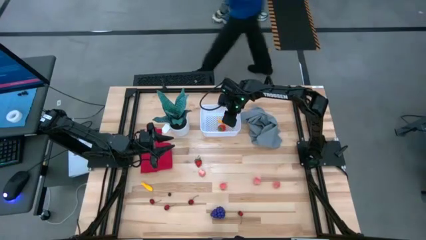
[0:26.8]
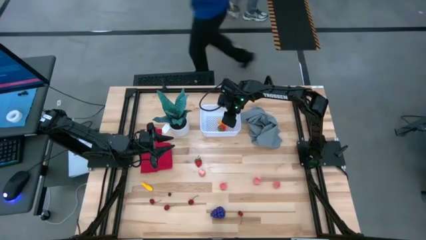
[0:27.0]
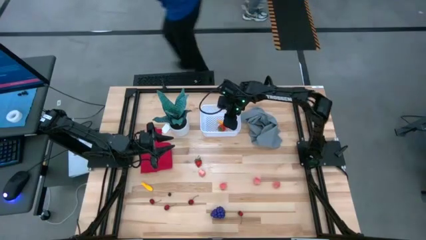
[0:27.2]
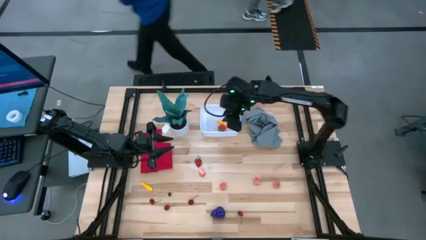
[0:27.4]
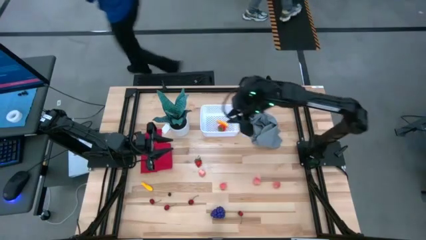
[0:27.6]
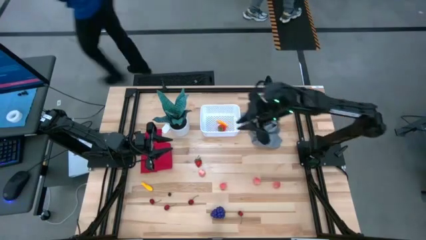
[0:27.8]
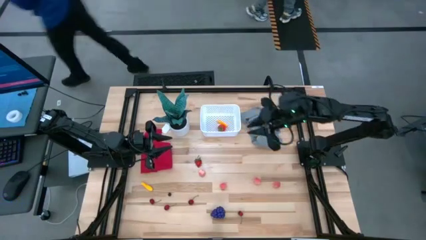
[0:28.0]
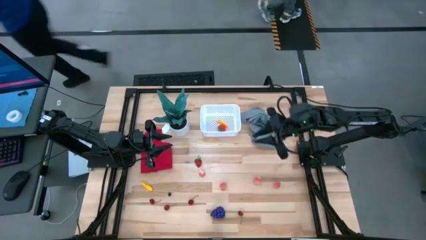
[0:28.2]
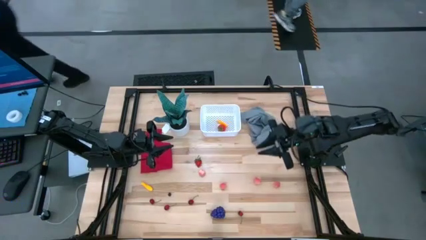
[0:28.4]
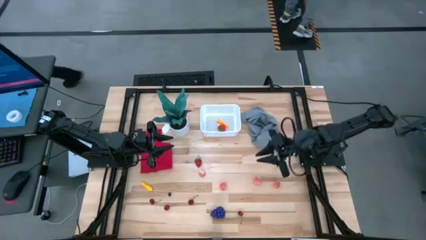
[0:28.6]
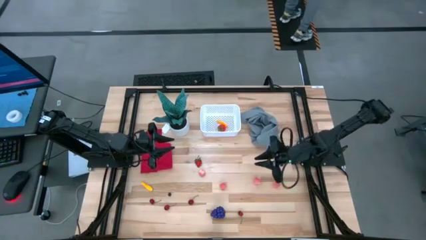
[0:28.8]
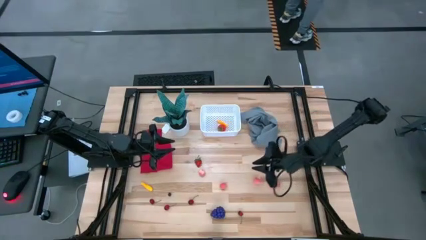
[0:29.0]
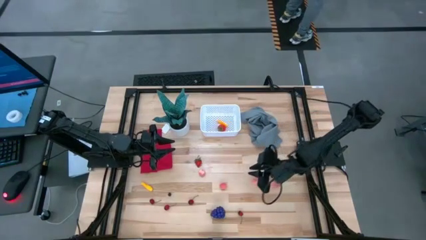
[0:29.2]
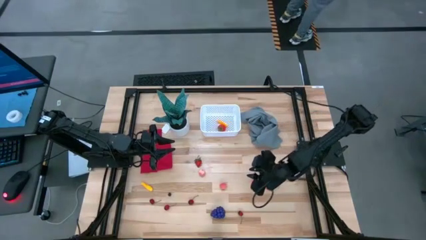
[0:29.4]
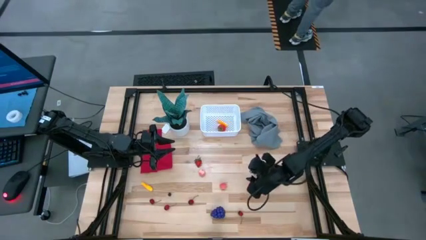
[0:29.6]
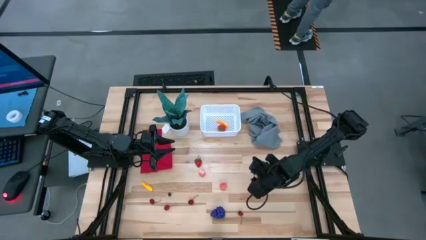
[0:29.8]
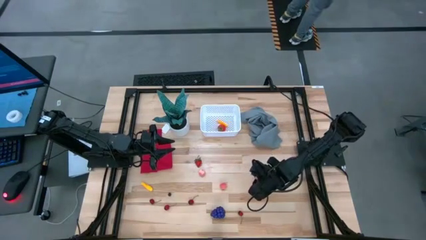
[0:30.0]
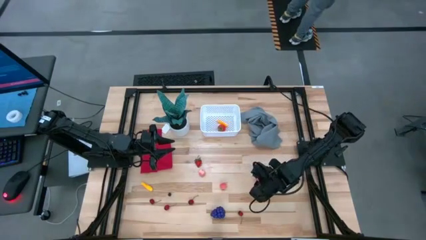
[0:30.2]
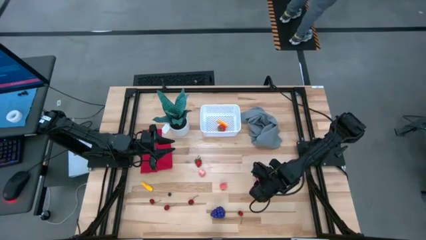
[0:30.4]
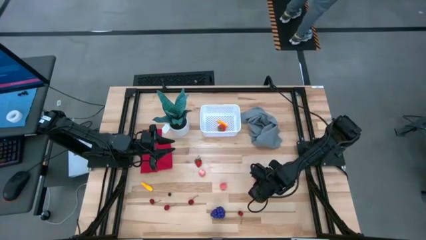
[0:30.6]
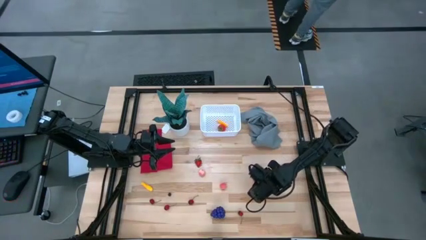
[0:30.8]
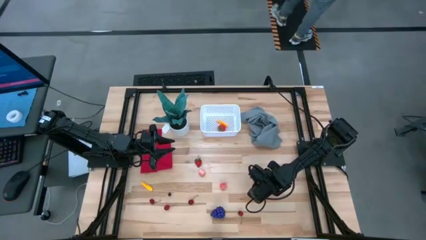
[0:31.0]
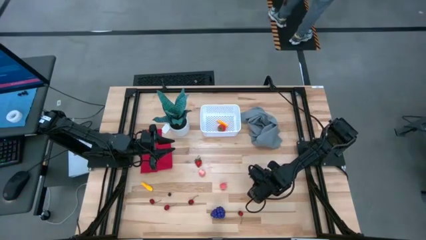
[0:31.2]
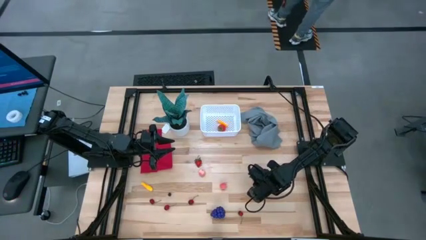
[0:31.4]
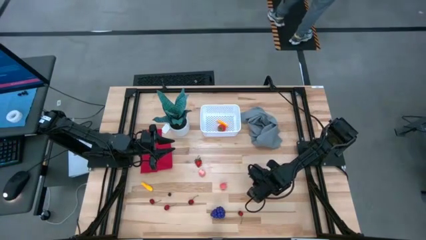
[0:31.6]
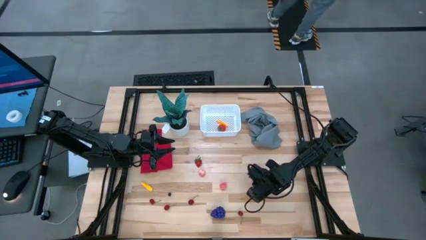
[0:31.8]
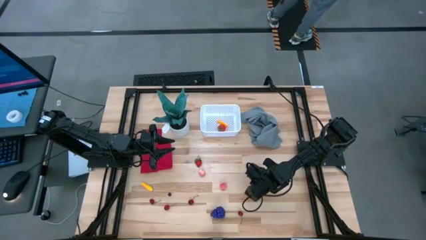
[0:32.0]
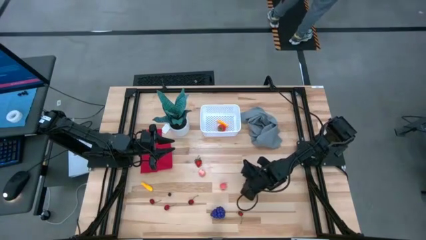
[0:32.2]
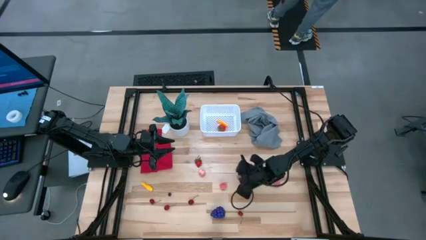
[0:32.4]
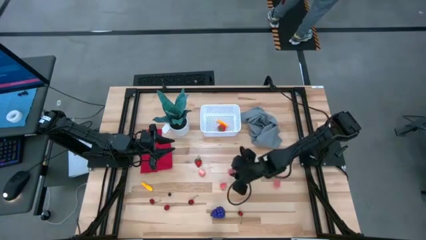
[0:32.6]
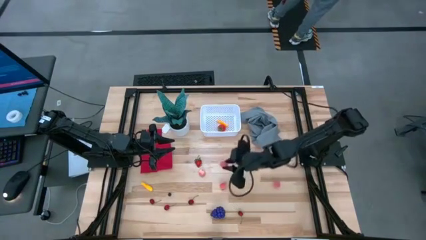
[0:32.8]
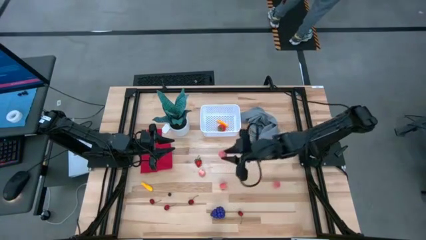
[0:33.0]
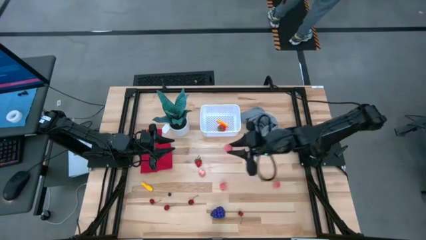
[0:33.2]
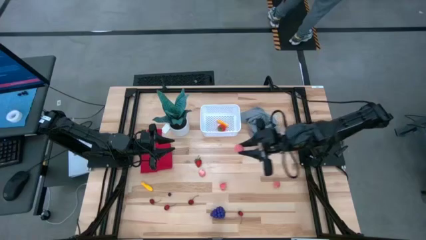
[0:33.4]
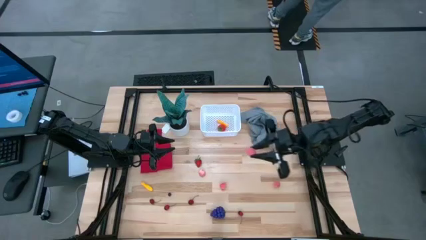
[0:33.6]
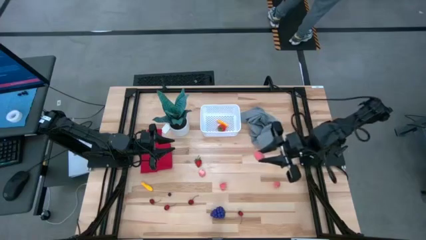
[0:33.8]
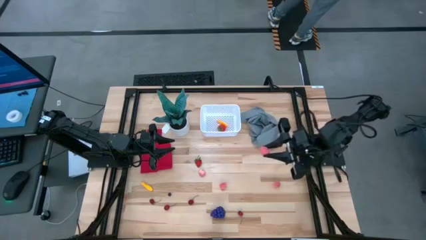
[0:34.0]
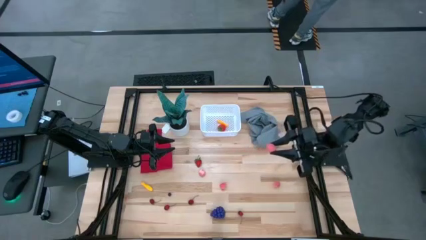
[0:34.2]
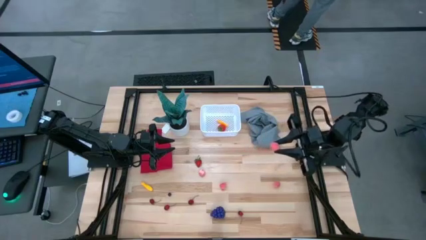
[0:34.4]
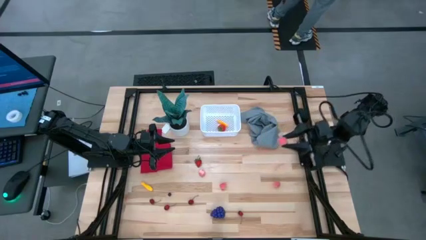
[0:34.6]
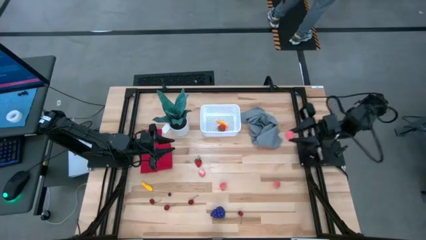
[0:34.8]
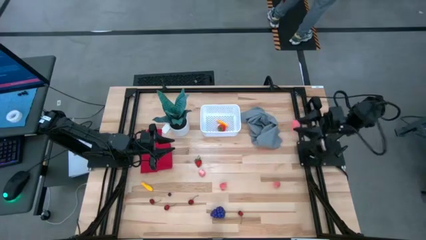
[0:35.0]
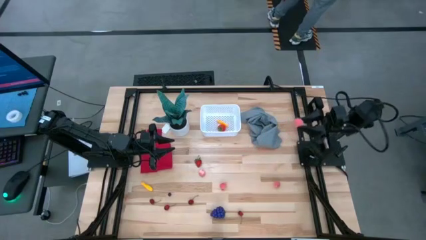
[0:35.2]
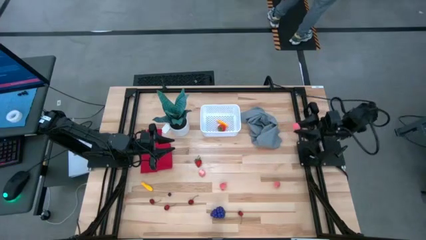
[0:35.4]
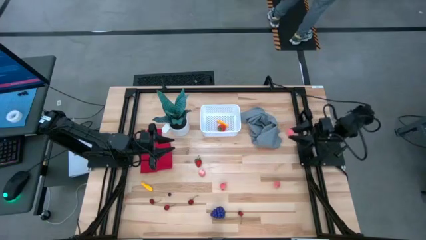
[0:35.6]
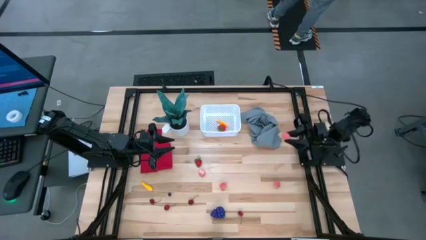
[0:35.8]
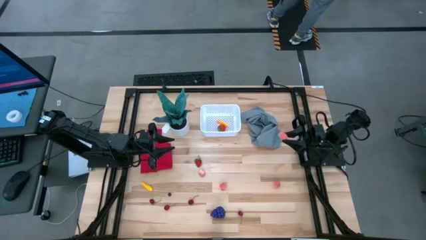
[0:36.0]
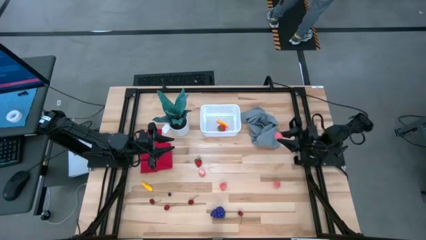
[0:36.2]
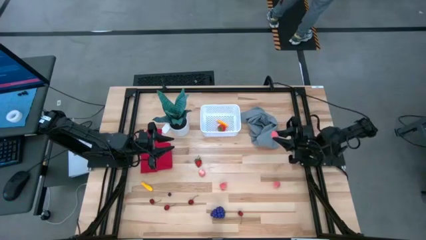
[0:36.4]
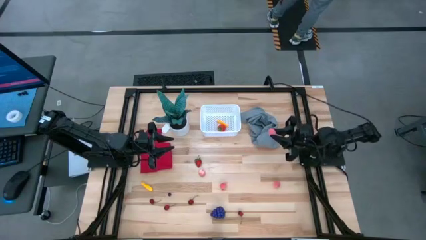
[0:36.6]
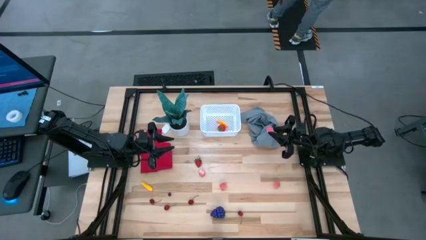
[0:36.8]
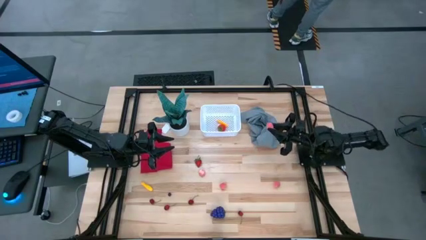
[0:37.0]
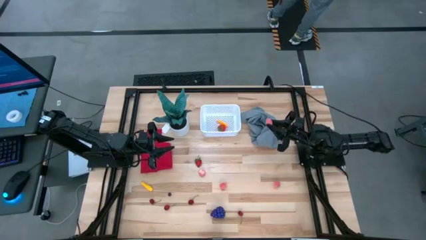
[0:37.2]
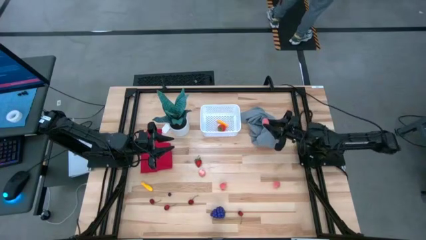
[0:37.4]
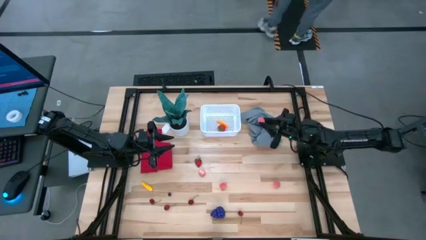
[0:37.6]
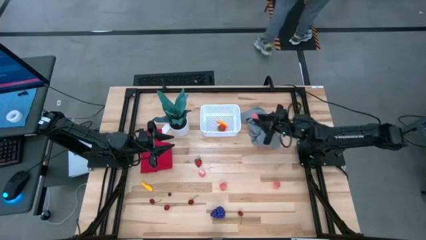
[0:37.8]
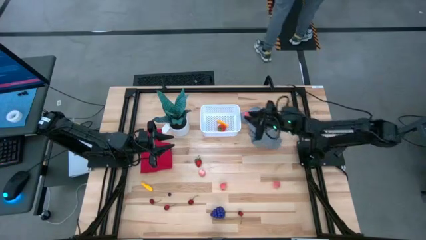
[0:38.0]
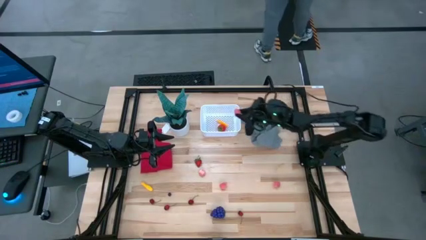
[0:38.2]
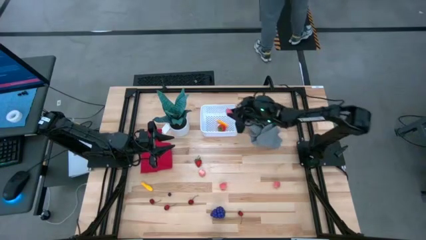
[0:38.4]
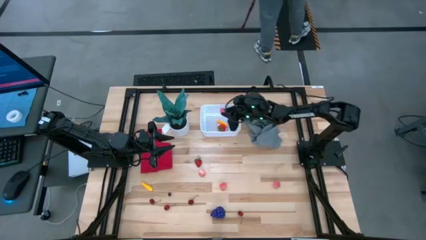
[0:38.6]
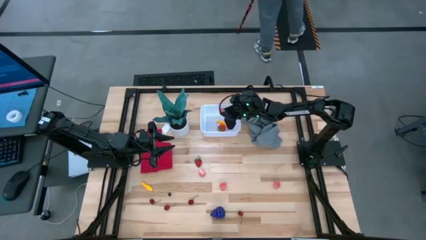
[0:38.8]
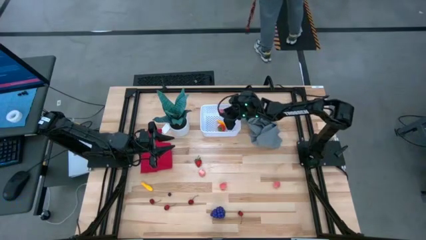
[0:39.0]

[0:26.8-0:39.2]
Task: Pick and placing Produce into tupperware
Put the pink peach into the white bin
